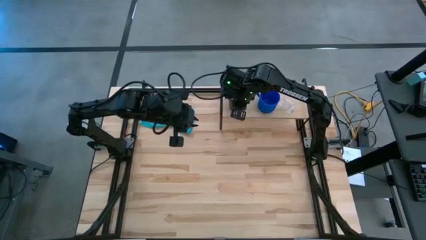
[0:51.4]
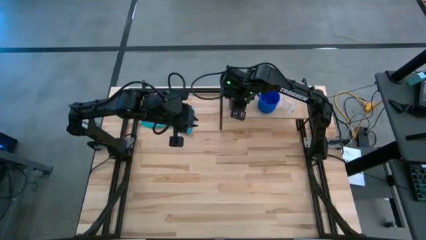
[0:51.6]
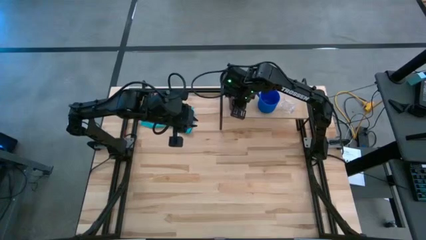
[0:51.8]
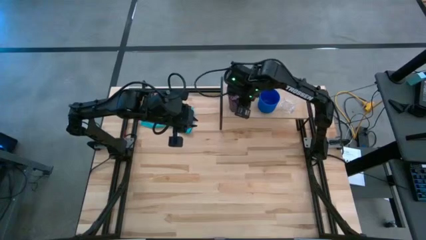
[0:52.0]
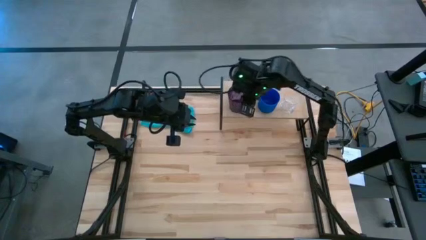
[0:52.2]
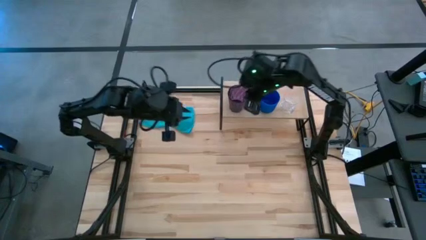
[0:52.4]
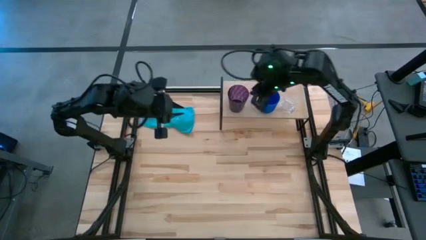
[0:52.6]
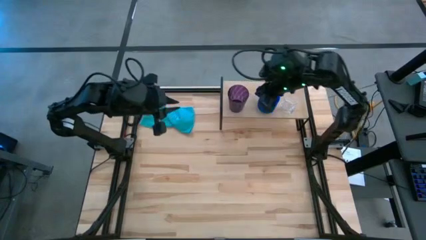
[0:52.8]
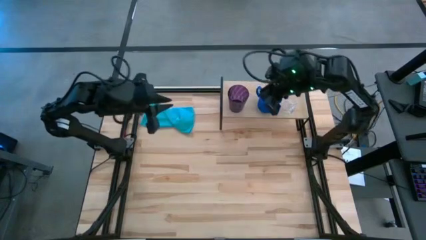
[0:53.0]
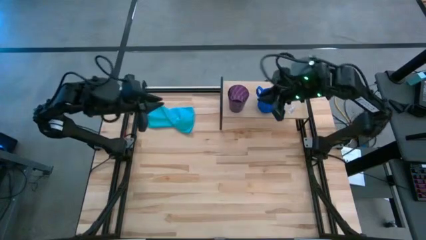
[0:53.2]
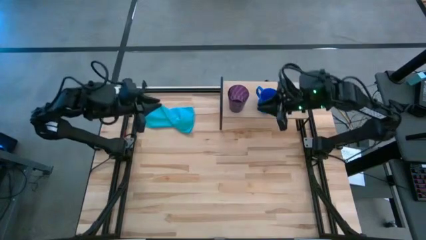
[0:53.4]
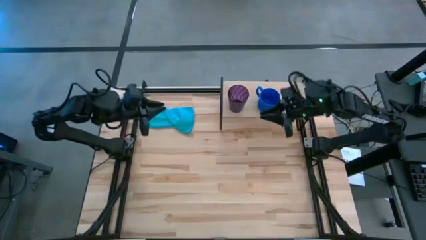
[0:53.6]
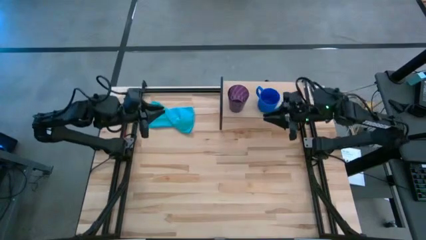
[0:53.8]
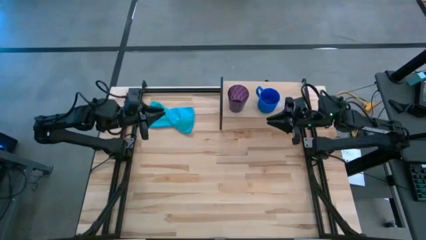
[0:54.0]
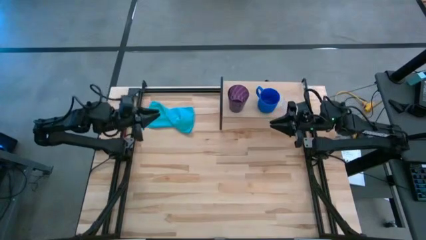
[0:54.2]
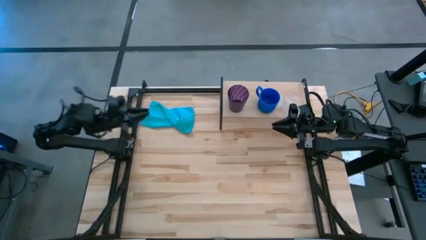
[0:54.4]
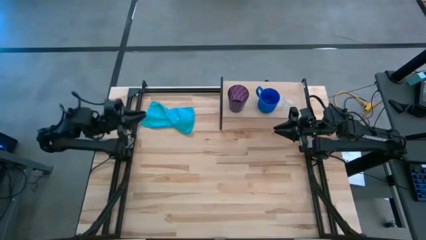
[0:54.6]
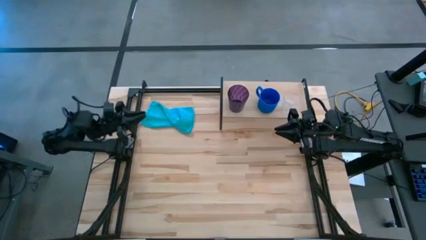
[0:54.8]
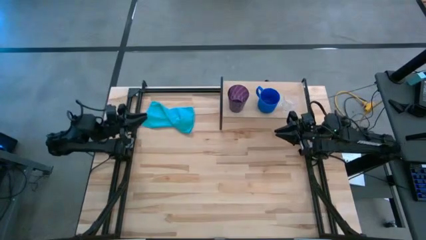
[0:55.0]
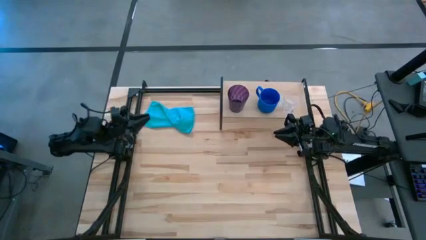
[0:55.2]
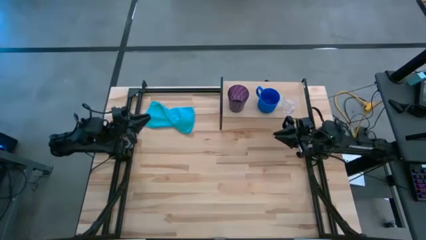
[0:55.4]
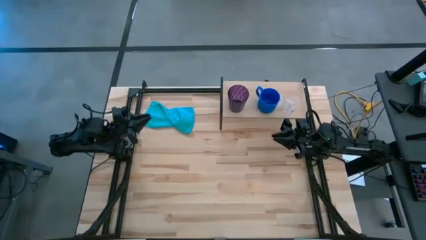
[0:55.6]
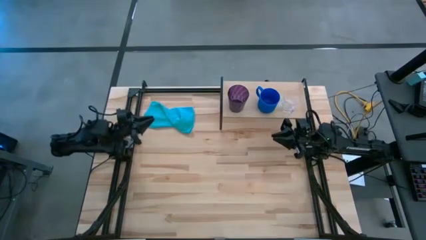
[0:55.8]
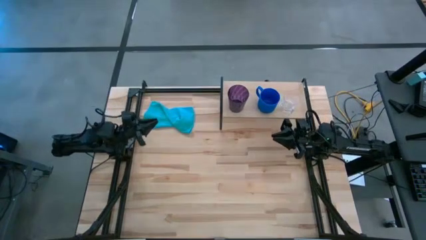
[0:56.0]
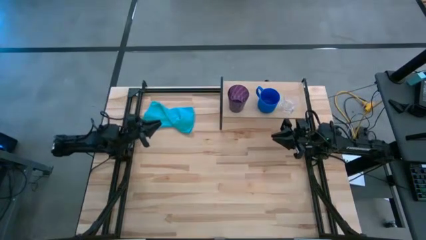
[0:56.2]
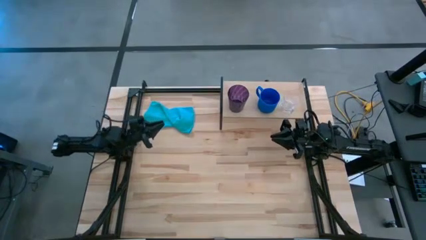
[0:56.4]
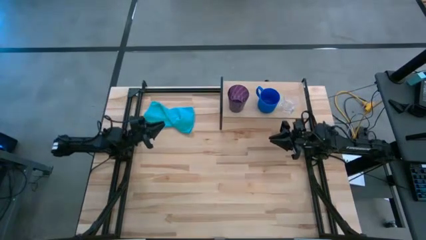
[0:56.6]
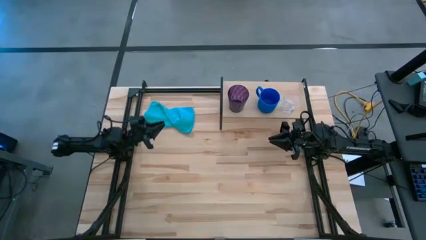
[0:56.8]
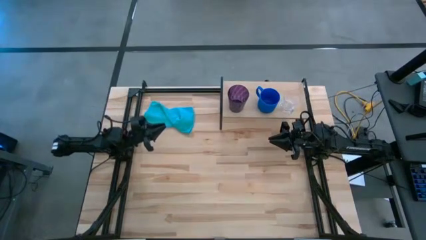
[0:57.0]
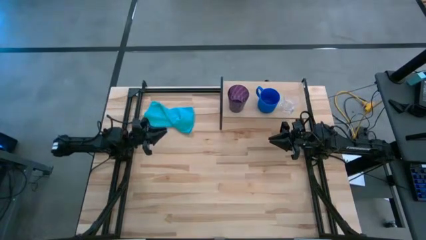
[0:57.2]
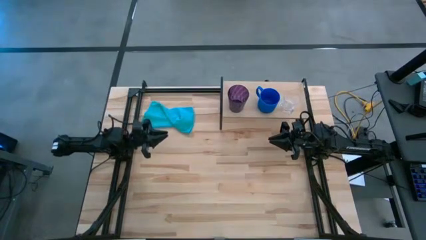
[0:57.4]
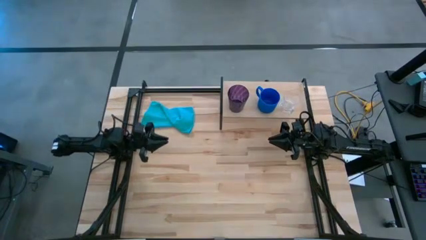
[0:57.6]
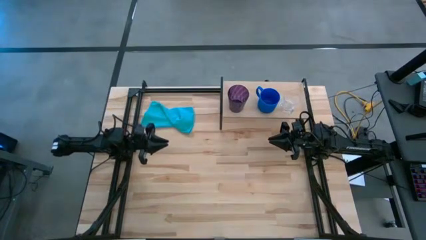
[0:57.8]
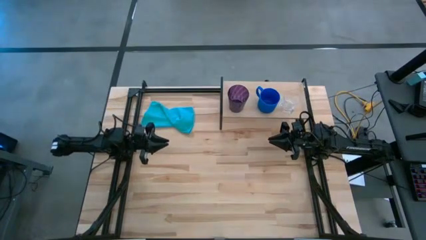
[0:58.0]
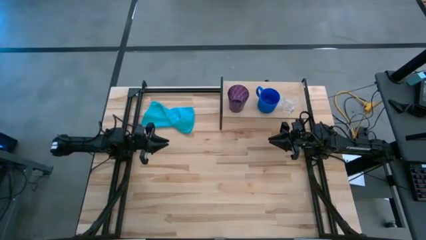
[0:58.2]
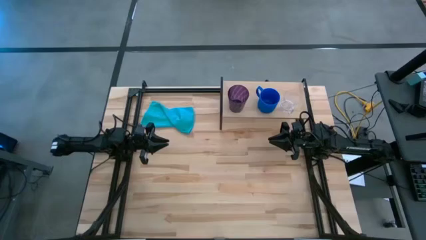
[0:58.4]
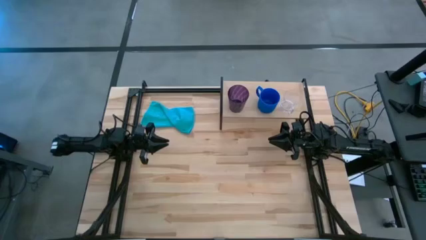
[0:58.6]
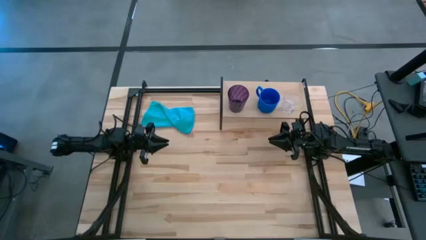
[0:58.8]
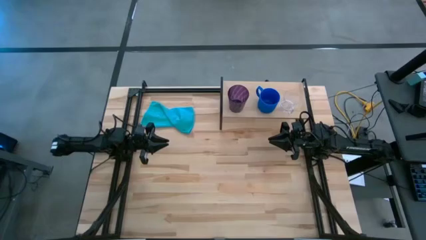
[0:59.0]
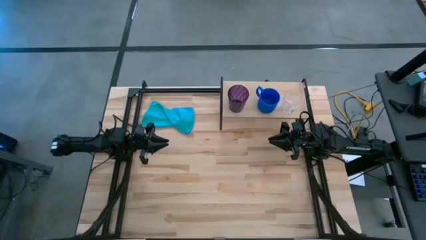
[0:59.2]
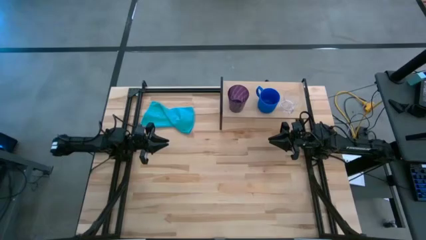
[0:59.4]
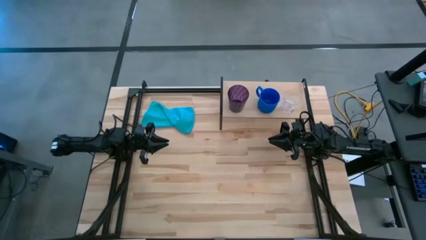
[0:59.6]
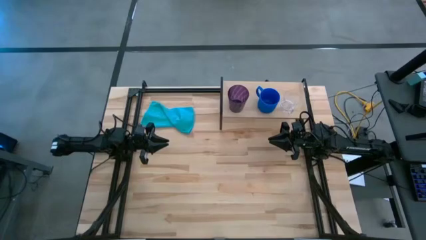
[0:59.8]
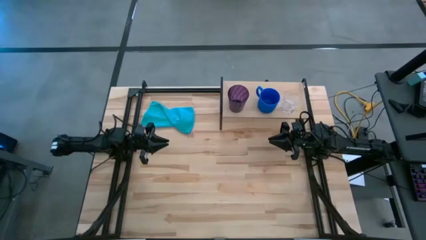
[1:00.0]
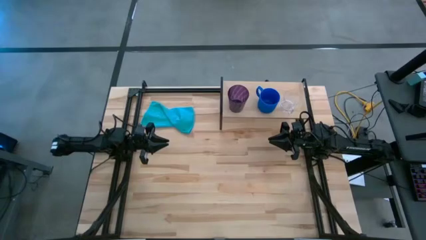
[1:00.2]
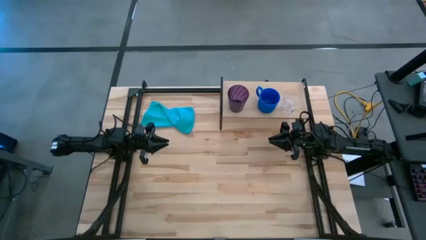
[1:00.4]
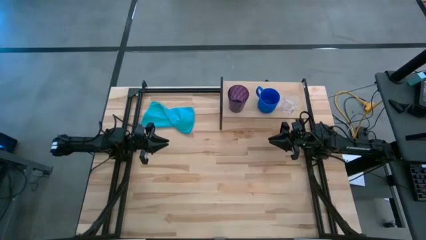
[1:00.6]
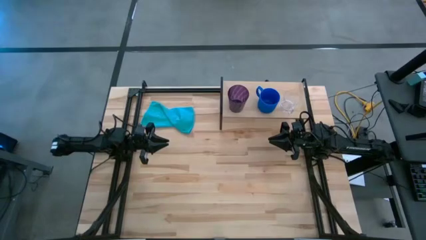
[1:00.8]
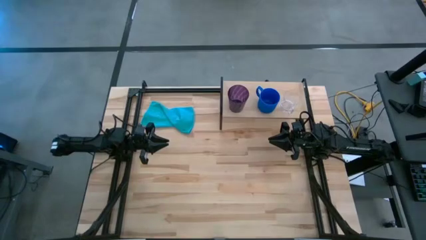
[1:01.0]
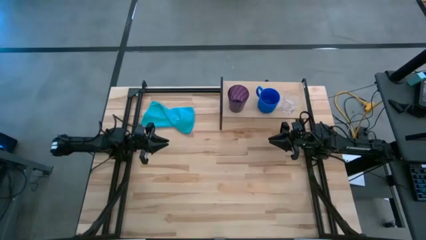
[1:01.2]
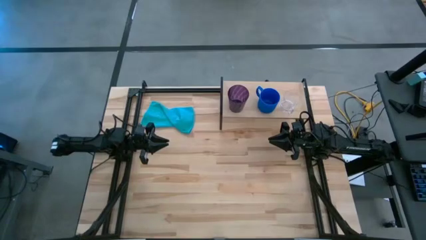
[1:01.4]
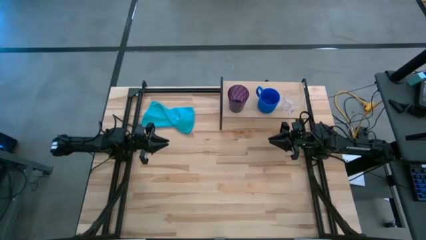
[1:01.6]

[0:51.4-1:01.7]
Task: Stack small to large cups/mugs on shelf
Return to Home Position

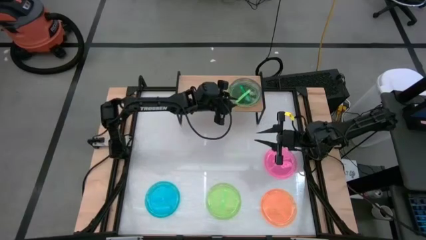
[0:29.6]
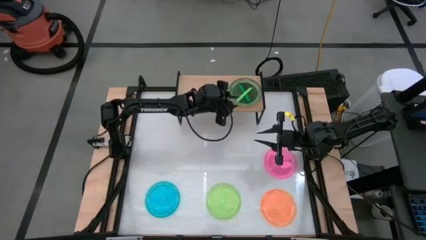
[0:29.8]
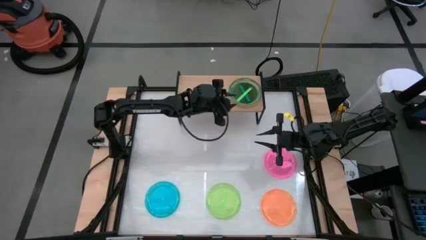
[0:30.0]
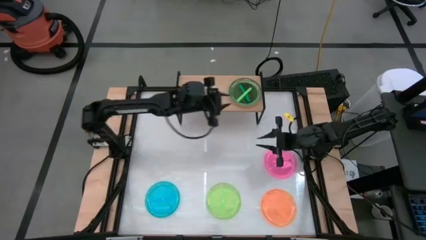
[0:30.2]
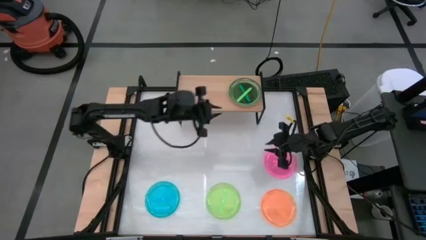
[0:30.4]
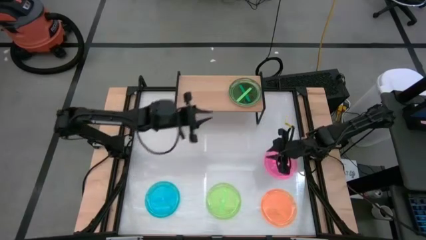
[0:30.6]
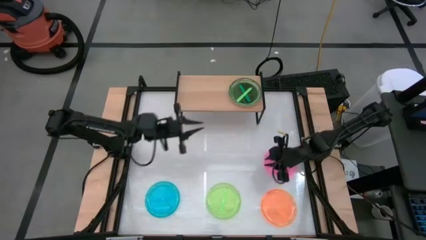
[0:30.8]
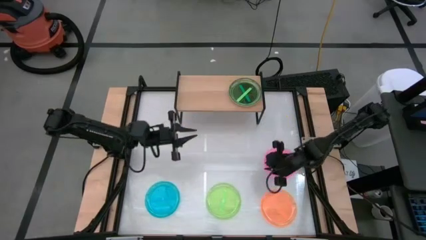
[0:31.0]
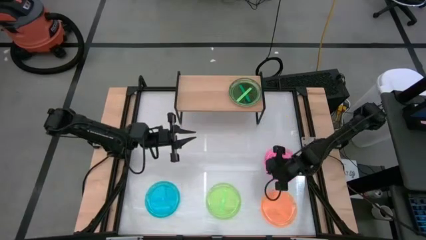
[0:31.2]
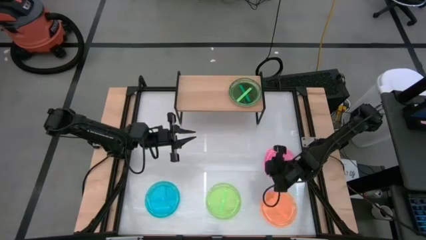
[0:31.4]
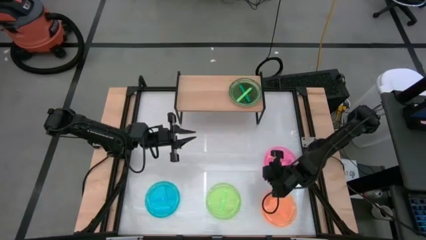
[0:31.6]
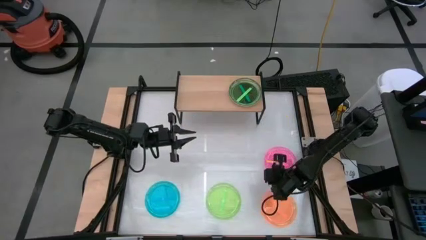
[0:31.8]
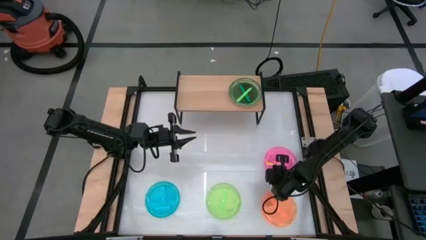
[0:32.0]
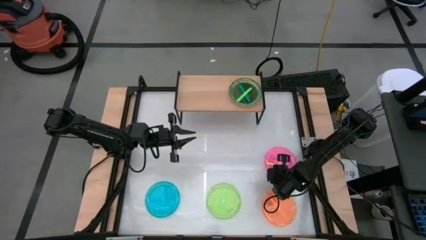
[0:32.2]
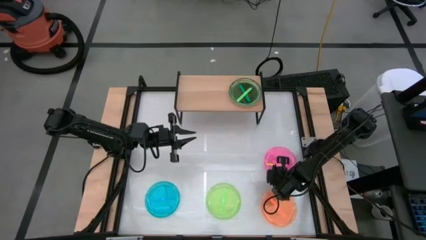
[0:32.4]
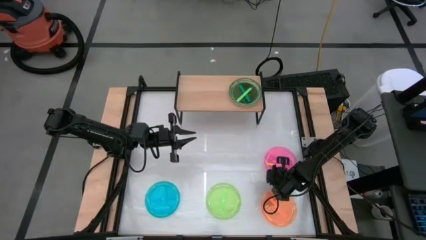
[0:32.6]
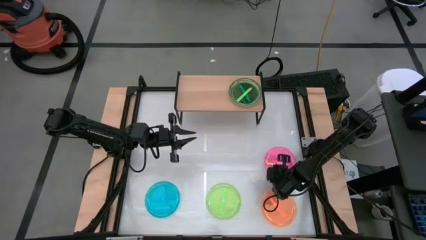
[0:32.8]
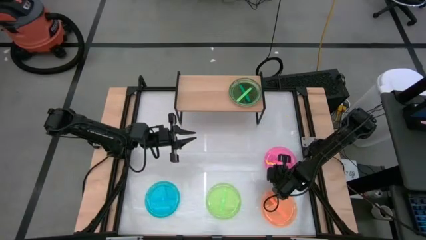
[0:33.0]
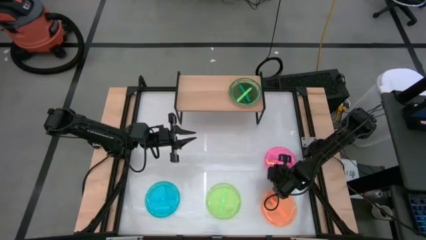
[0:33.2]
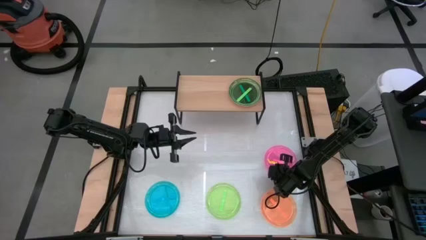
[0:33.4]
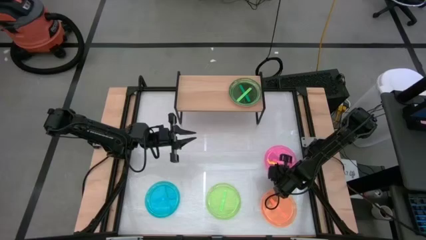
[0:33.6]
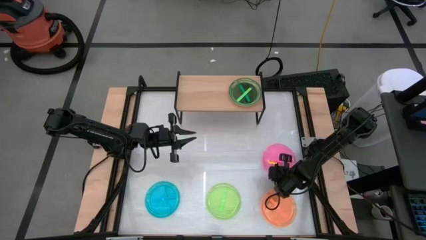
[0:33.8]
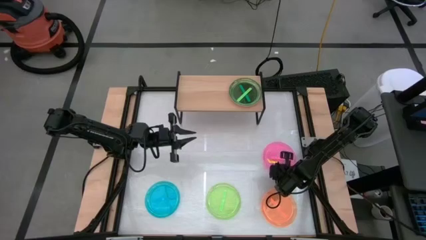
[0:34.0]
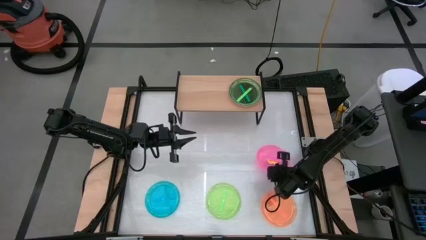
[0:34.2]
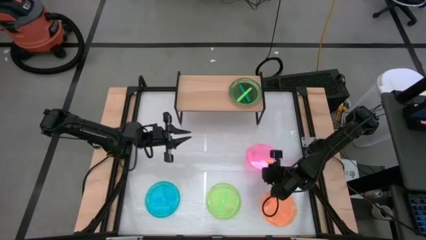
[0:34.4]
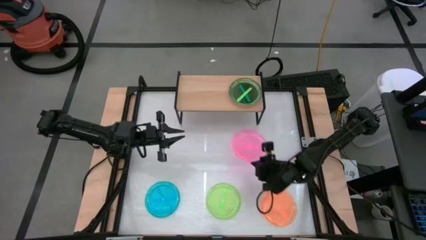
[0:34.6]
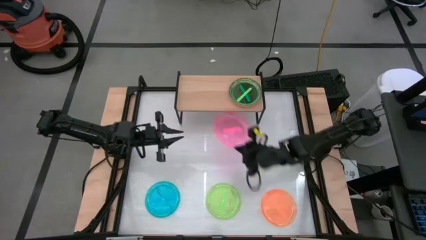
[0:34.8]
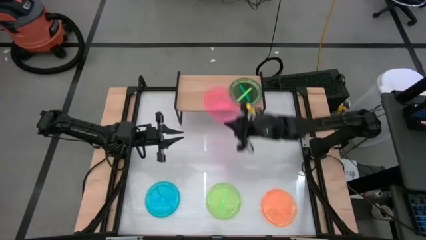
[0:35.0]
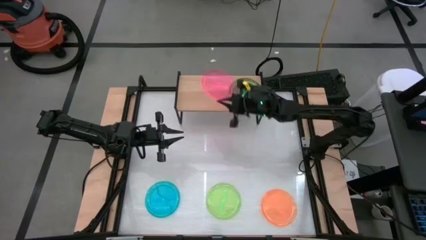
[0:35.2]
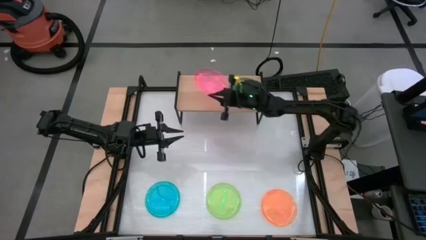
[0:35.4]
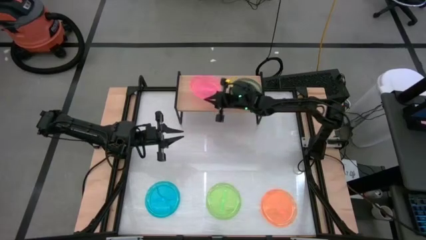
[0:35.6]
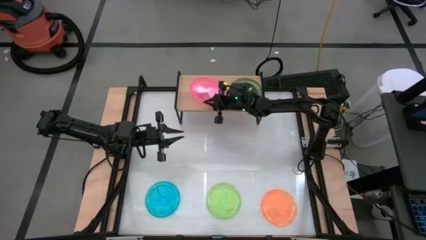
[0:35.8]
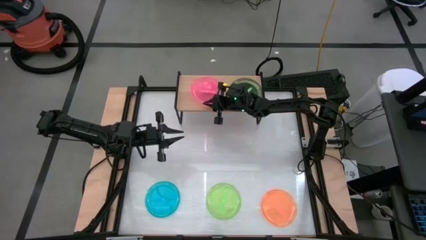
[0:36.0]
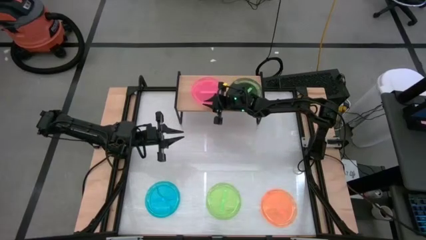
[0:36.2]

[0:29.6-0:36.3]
Task: Place and stack plates onto a shelf
Put the pink plate on the shelf
